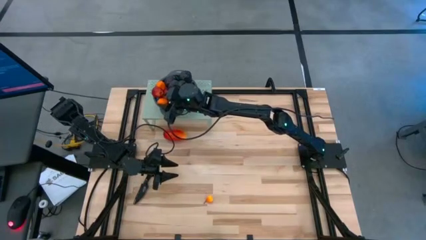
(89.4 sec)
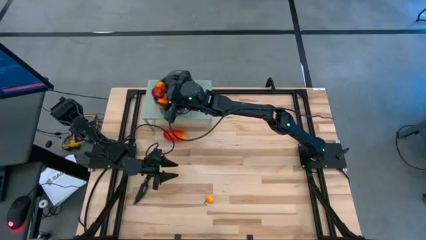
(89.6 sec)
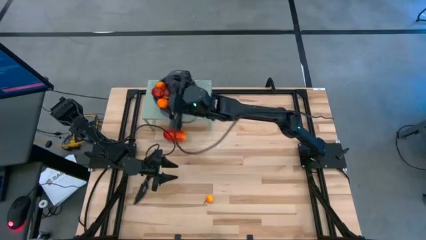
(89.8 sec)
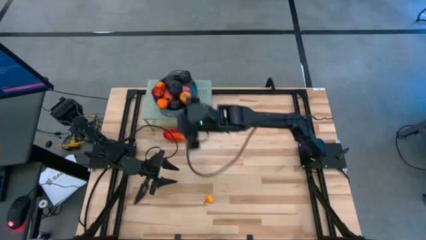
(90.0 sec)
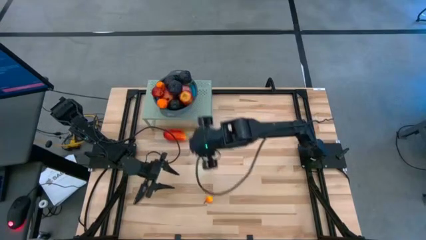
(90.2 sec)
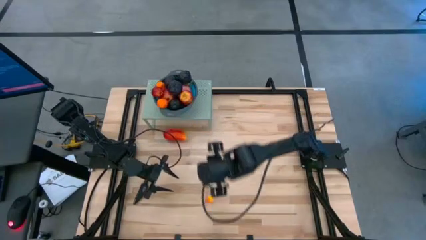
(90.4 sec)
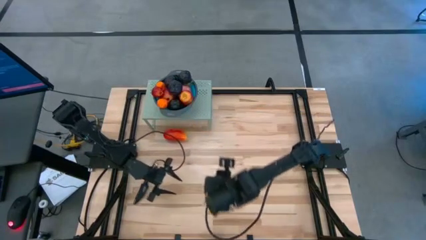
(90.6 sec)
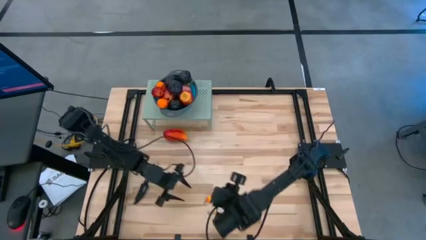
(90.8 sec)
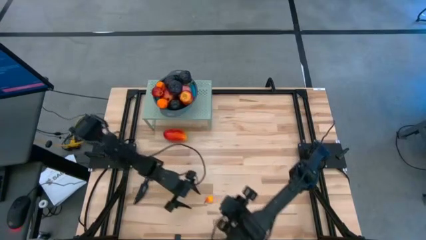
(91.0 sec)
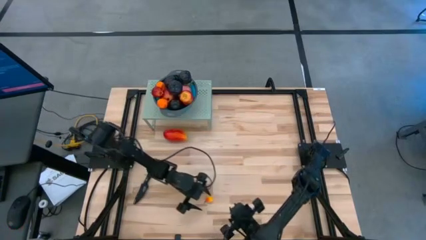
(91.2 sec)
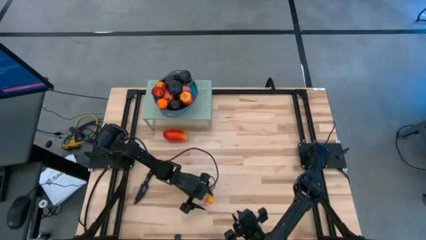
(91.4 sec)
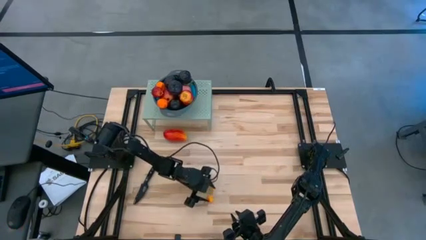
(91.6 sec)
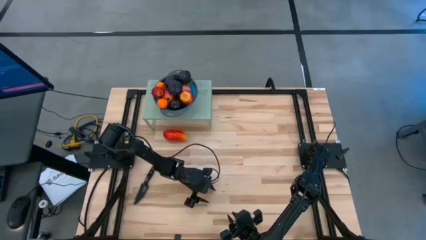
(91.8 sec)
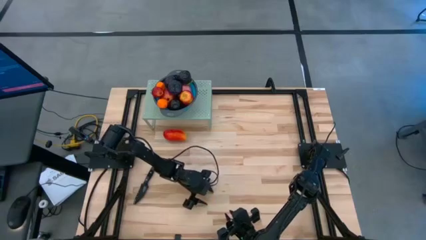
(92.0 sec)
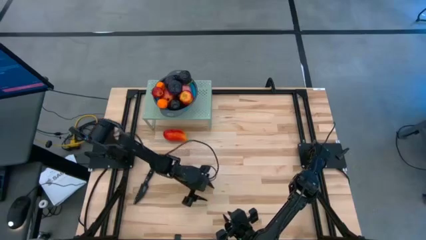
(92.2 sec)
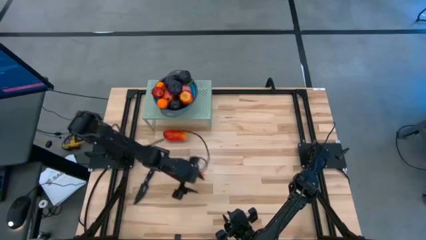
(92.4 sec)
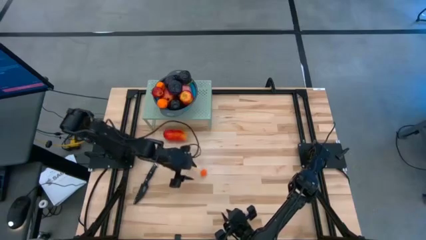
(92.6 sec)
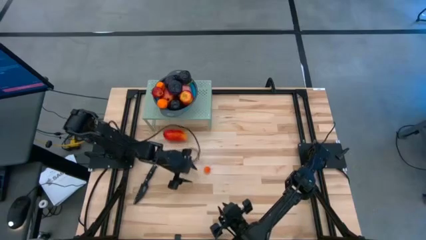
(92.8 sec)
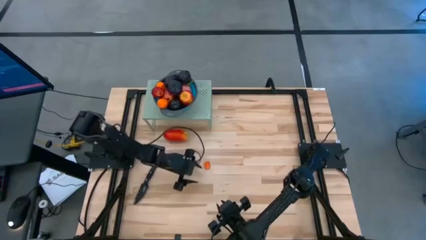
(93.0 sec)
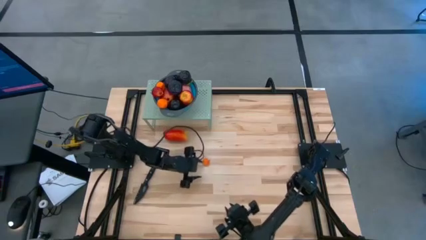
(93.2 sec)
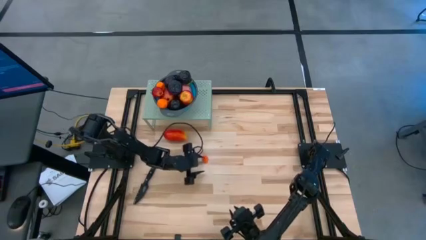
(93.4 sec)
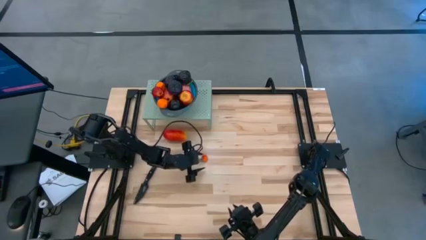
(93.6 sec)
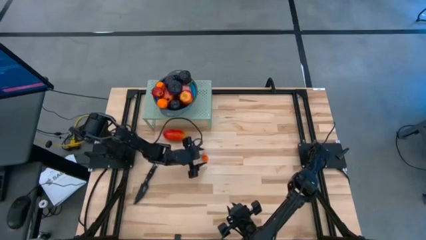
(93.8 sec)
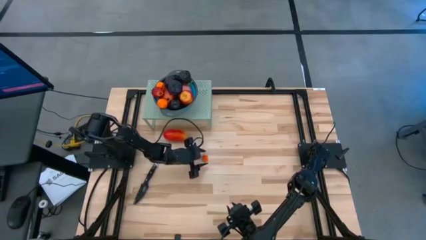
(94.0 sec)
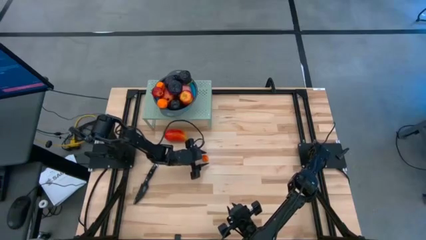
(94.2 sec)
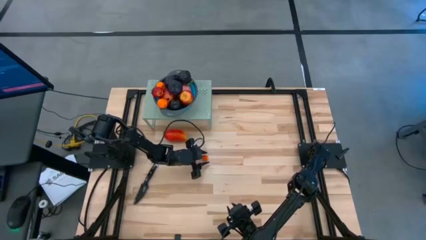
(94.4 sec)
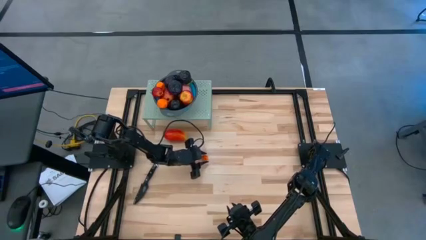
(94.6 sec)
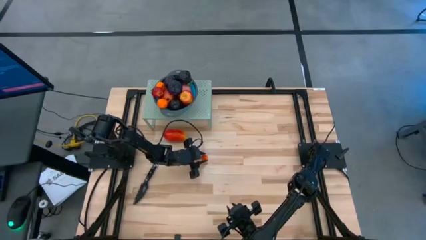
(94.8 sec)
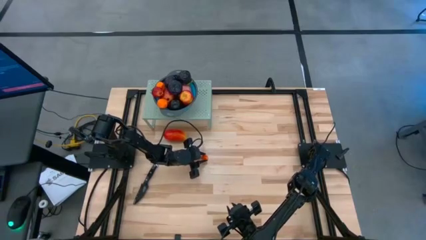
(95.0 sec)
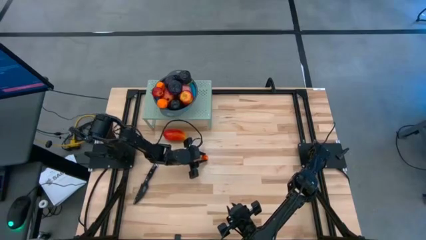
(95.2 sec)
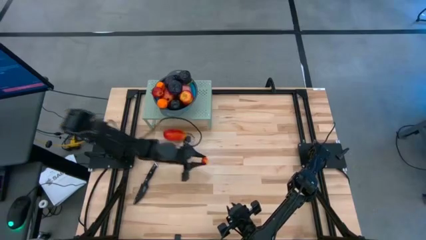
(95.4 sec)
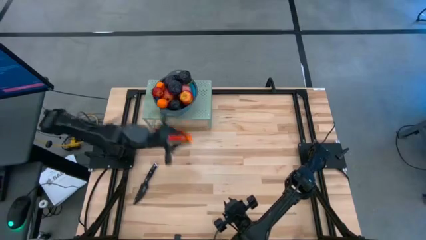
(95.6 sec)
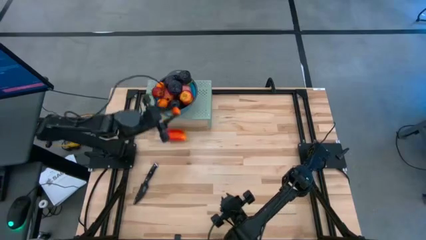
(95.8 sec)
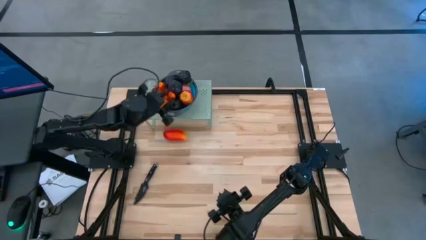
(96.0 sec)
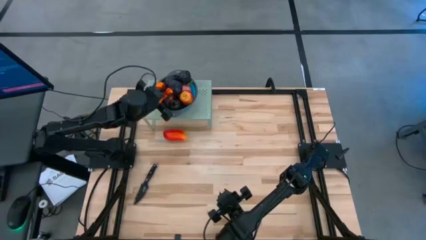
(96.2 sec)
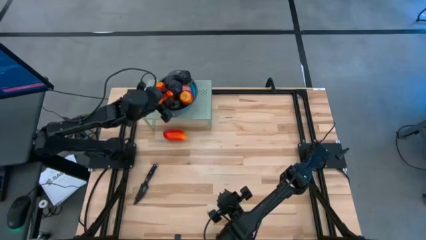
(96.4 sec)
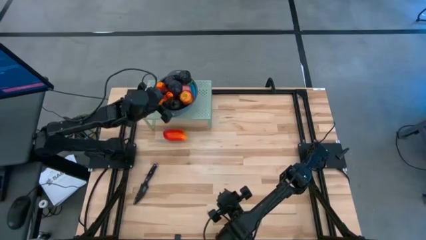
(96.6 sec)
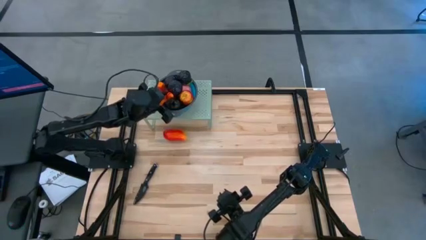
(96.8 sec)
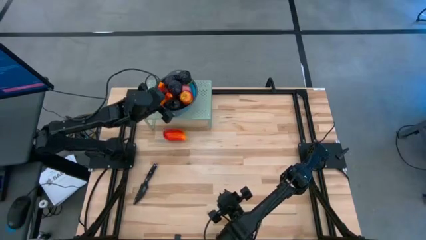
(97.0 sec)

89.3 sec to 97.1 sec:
Task: Pick & Place Fruit
Put the orange peach into the blue strainer bowl on the shelf

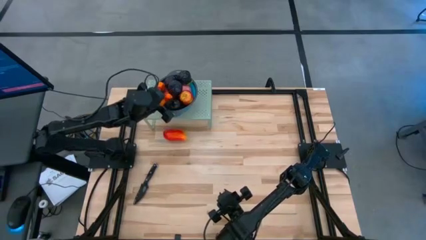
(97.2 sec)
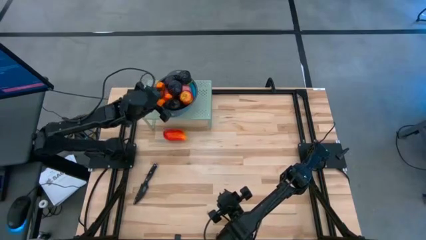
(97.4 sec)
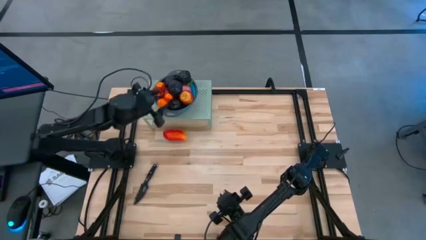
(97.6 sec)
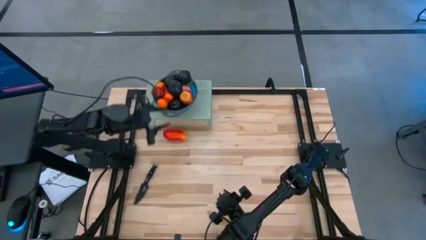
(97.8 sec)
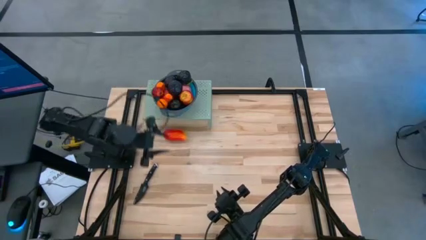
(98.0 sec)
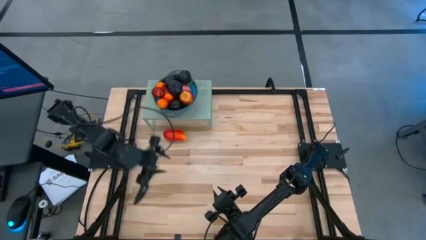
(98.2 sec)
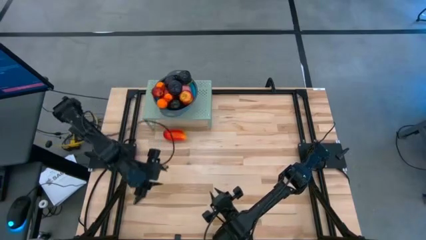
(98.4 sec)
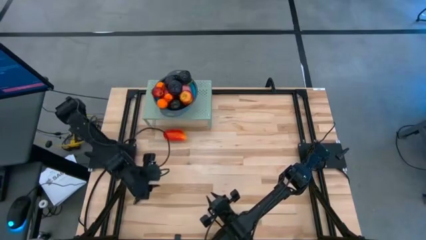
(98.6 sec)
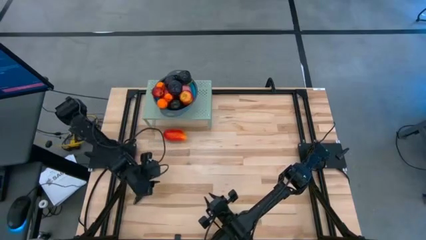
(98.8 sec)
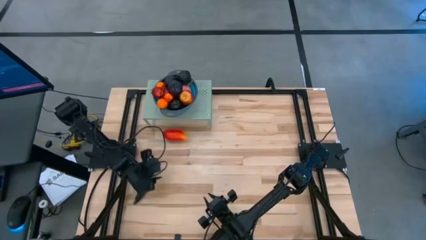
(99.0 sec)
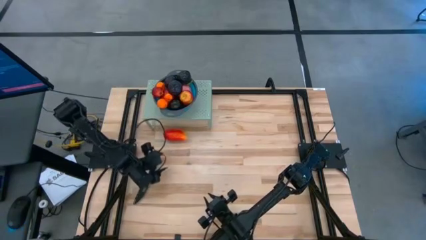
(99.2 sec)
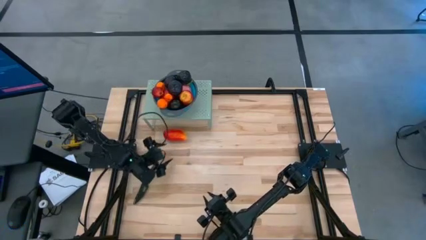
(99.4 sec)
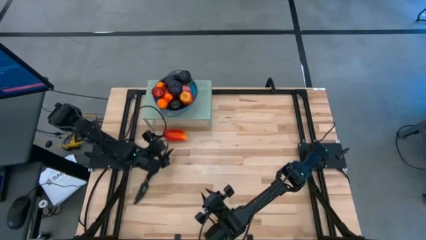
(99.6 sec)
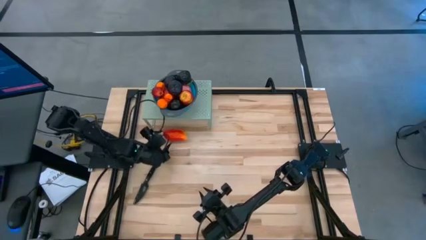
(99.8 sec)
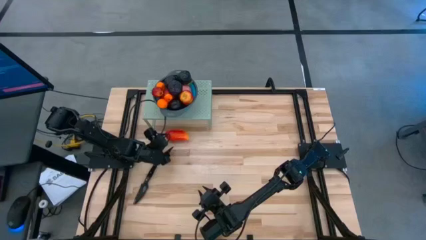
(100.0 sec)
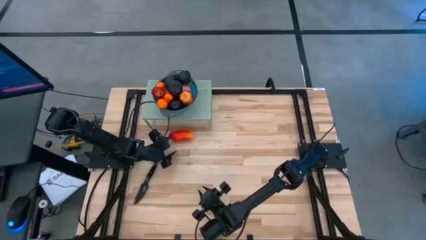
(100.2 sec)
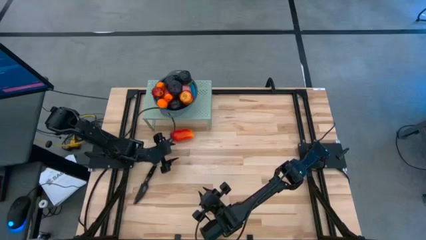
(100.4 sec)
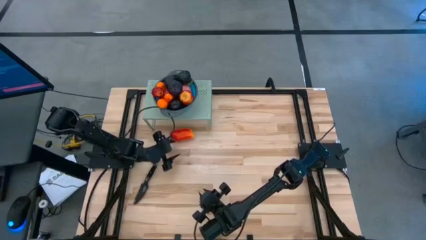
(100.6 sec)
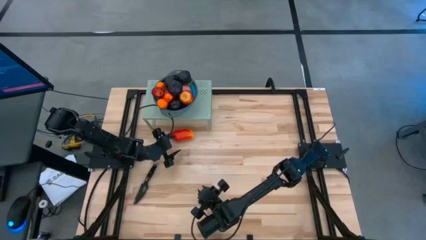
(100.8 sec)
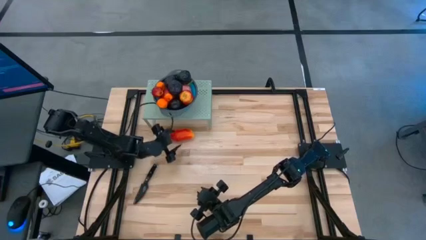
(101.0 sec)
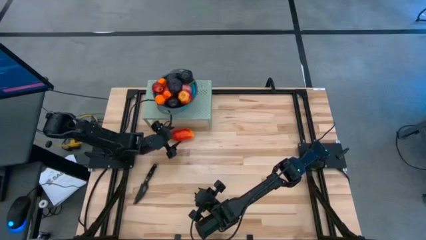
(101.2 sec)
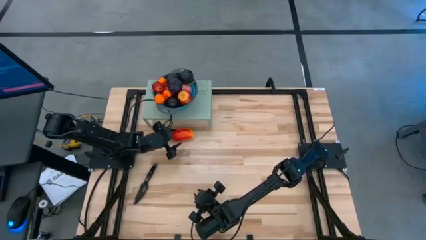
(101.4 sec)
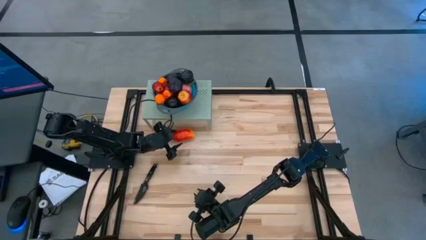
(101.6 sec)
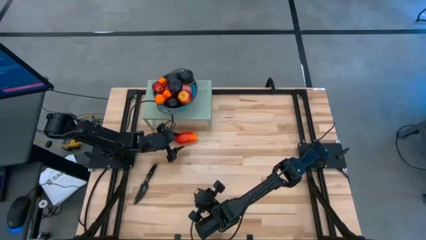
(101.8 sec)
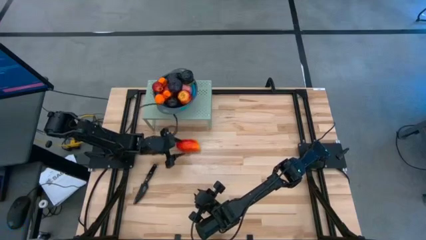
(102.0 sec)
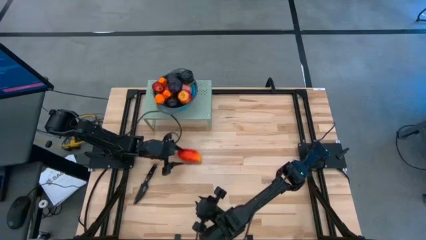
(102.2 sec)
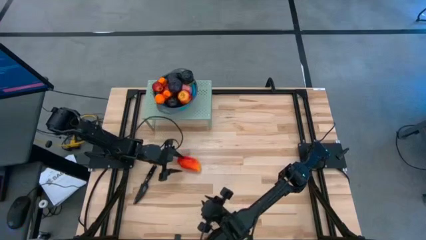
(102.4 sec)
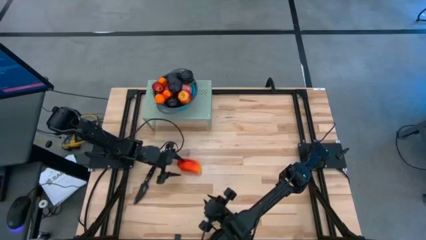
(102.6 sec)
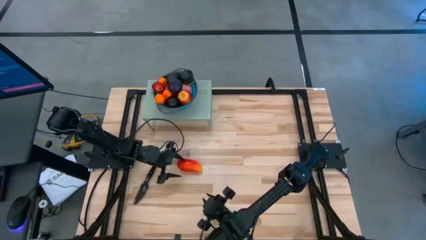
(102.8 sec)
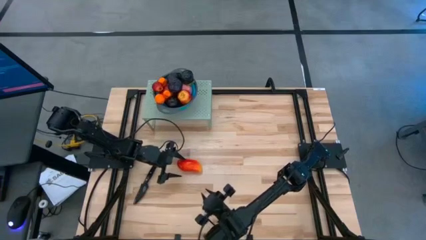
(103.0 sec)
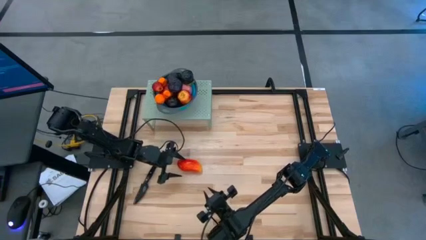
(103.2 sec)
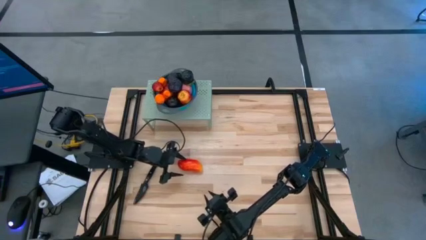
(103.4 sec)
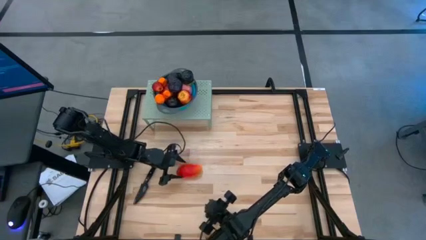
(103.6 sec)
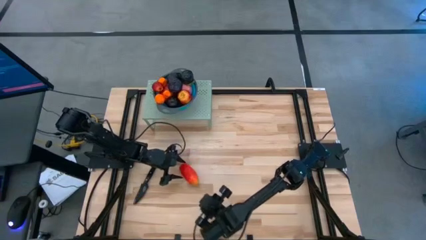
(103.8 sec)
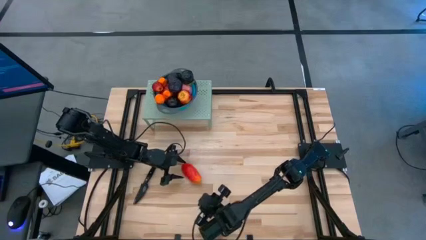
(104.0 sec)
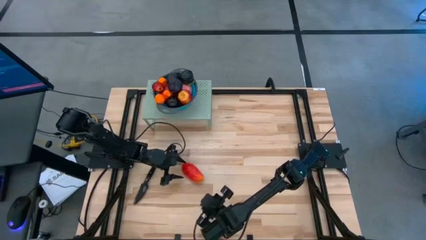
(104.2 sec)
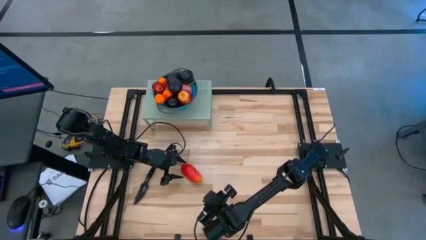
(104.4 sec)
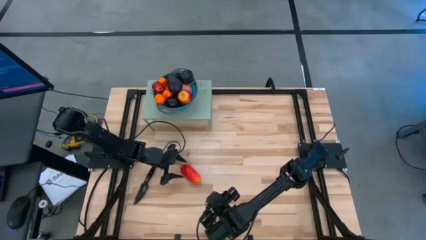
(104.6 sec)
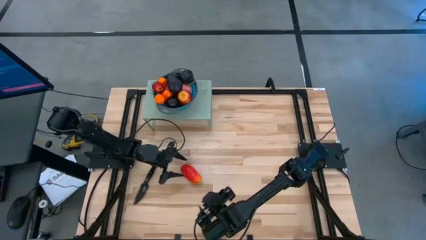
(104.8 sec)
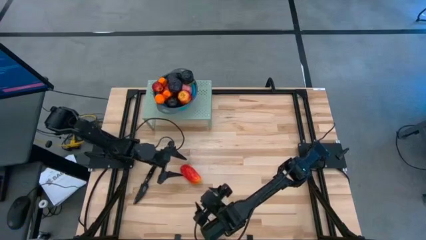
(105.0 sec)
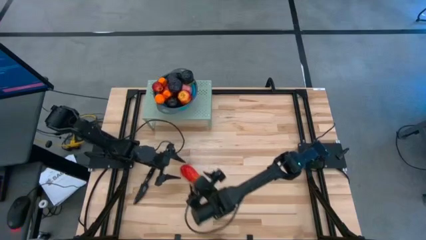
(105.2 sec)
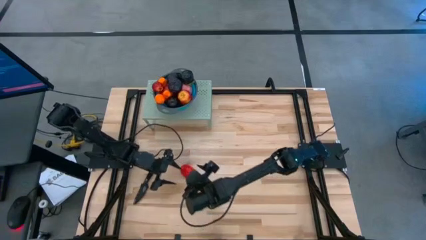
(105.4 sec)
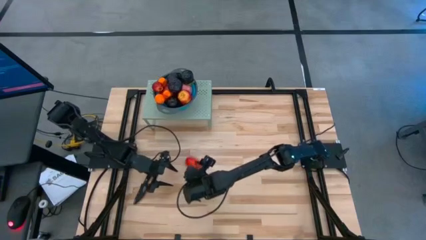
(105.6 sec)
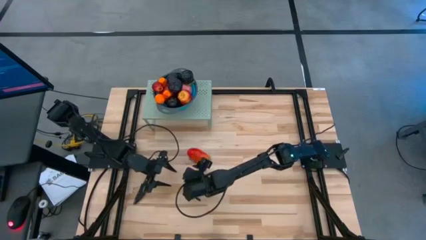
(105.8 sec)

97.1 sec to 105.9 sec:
Put the orange mango into the blue strainer bowl on the shelf
